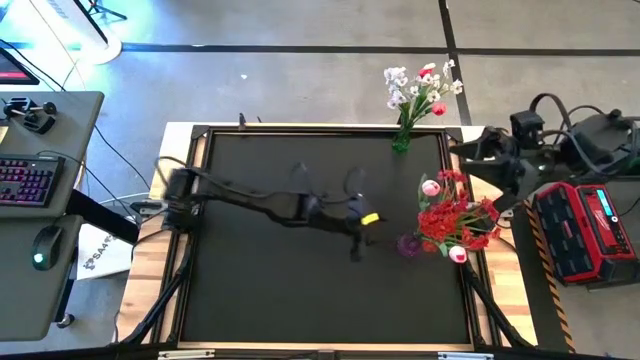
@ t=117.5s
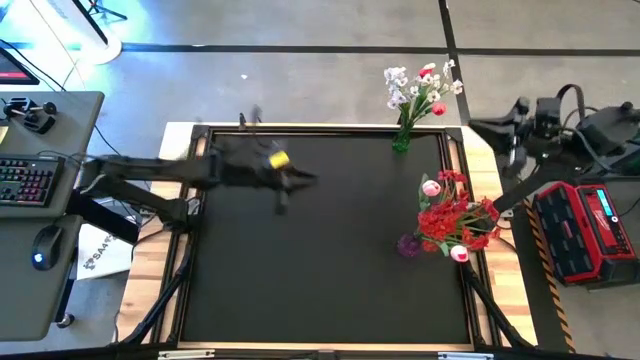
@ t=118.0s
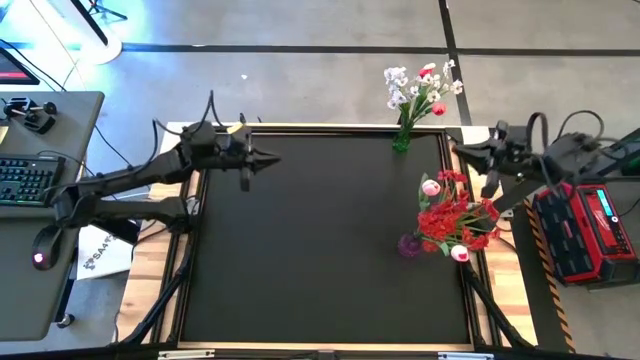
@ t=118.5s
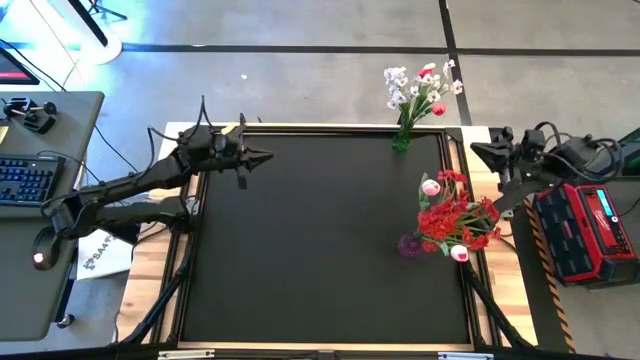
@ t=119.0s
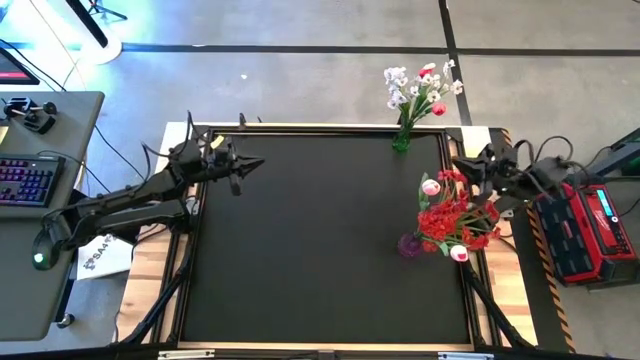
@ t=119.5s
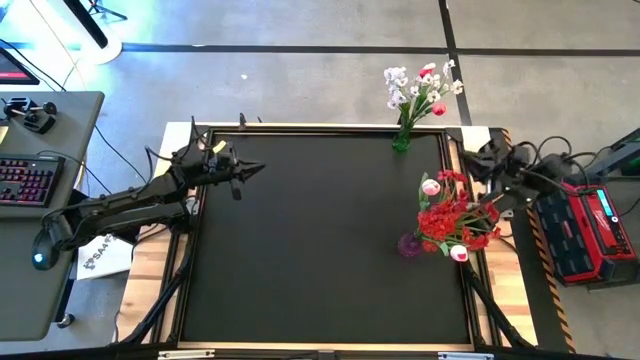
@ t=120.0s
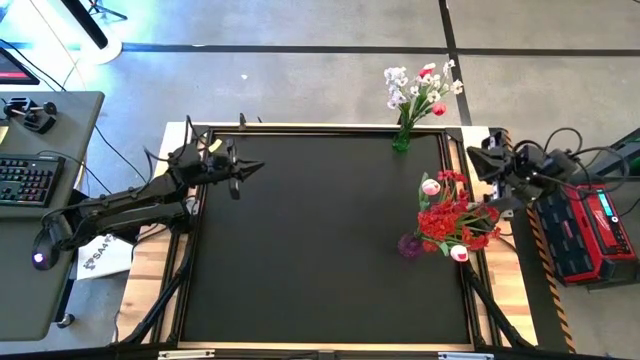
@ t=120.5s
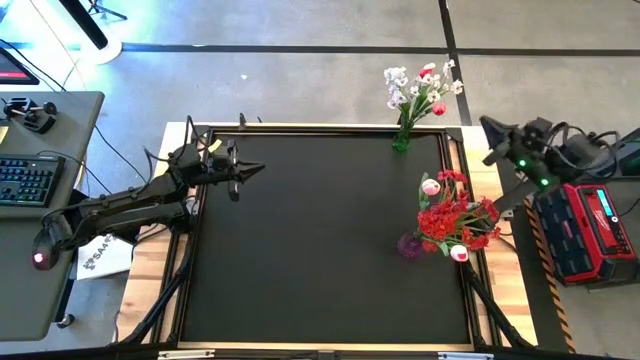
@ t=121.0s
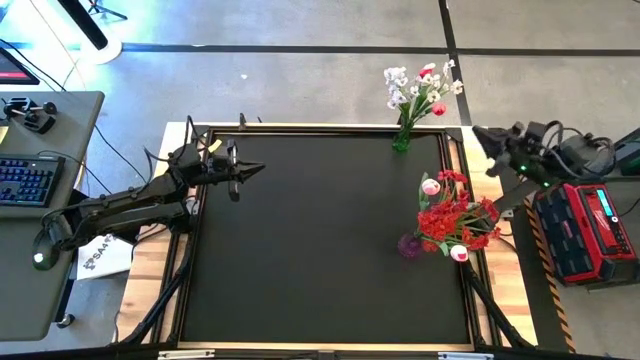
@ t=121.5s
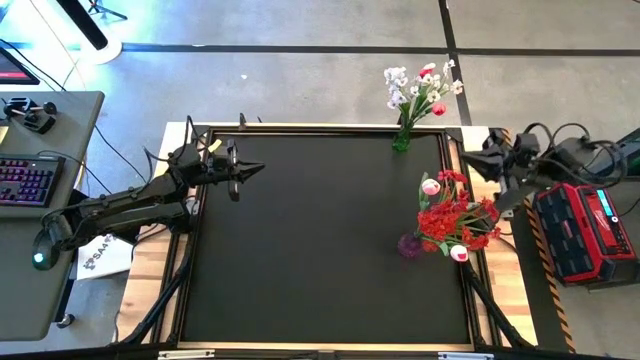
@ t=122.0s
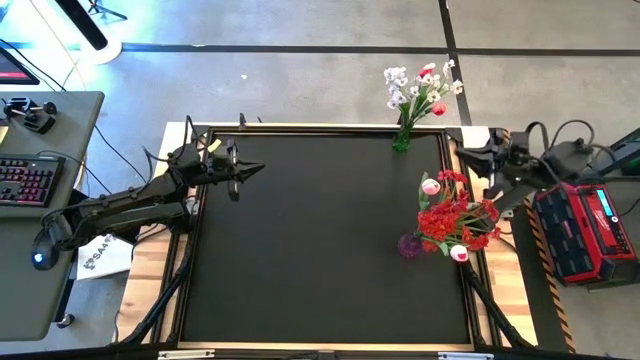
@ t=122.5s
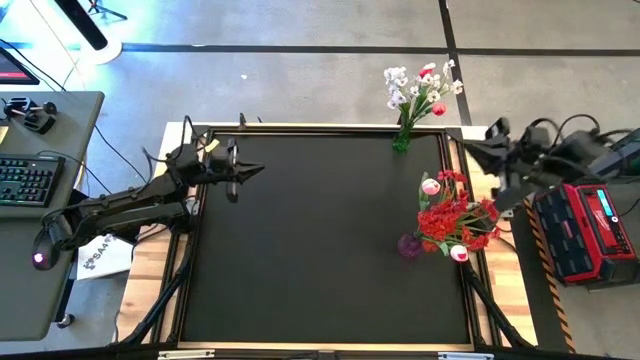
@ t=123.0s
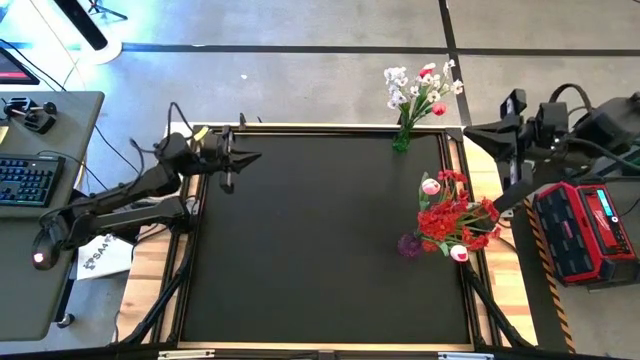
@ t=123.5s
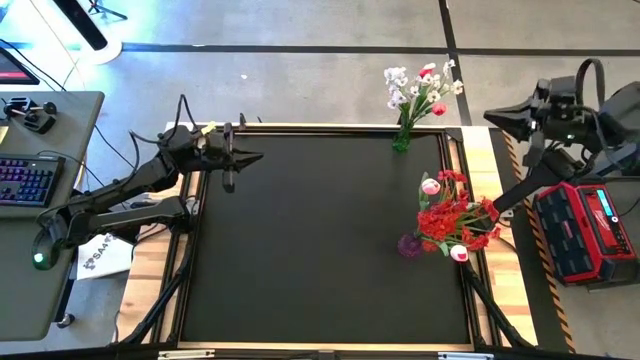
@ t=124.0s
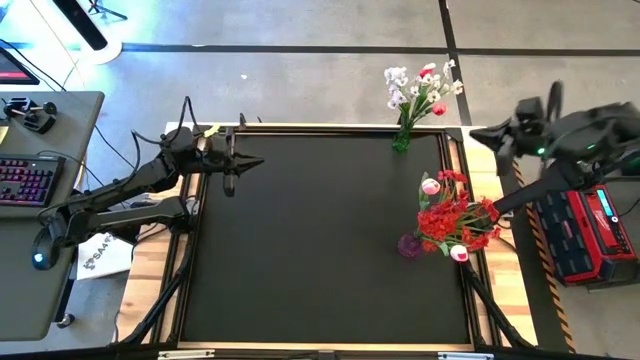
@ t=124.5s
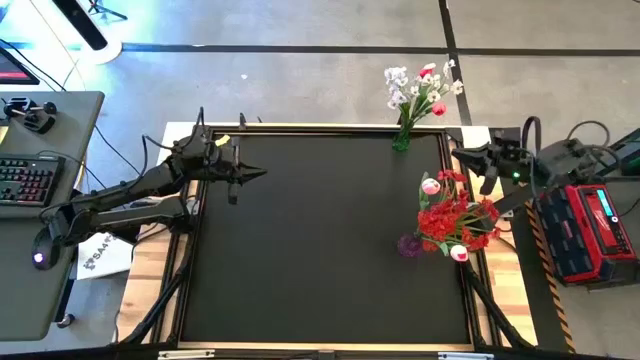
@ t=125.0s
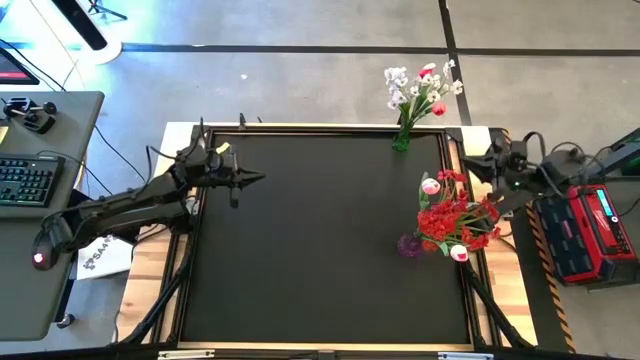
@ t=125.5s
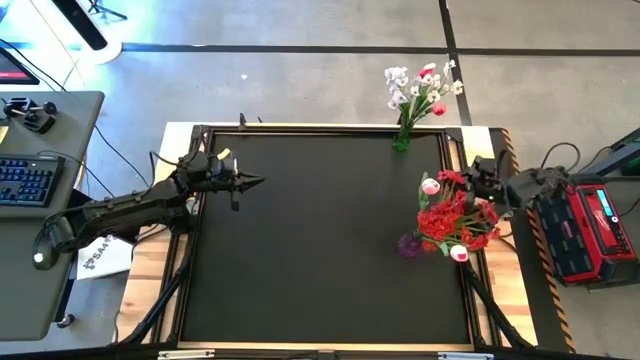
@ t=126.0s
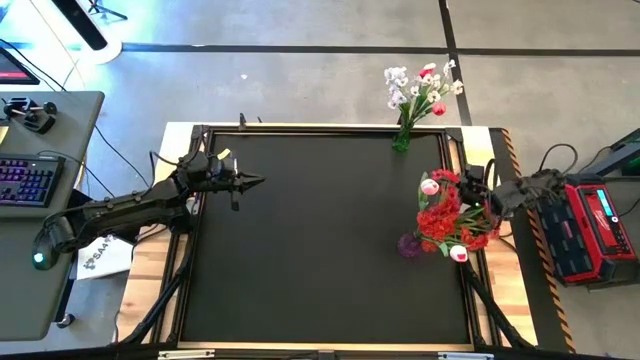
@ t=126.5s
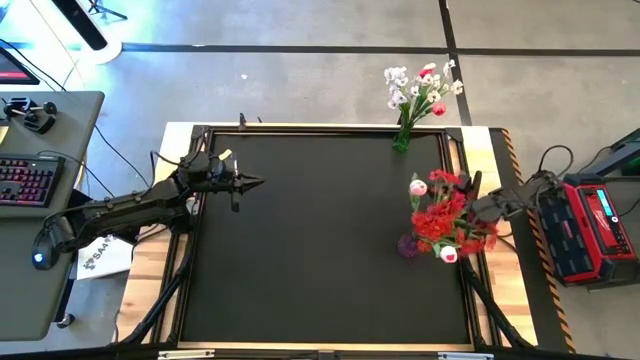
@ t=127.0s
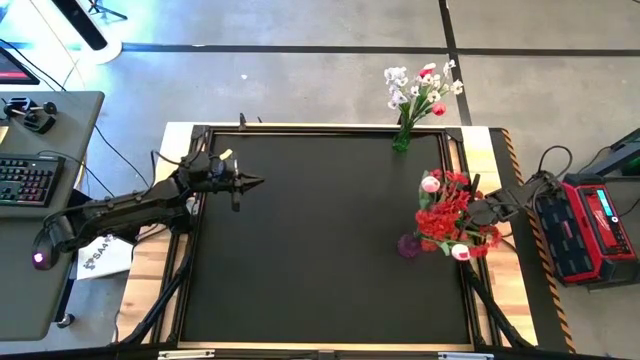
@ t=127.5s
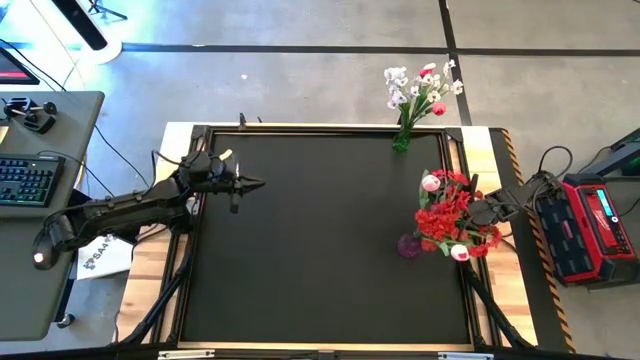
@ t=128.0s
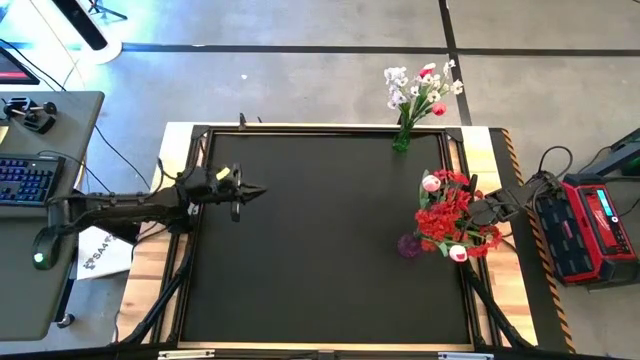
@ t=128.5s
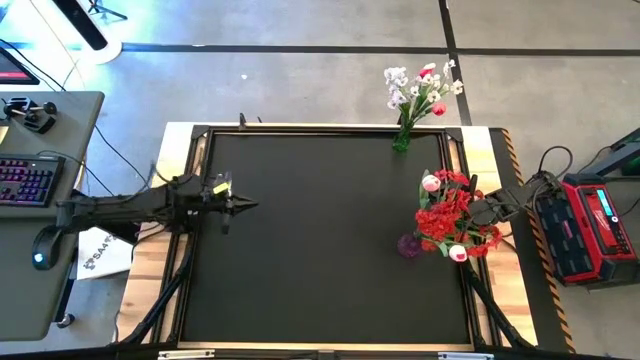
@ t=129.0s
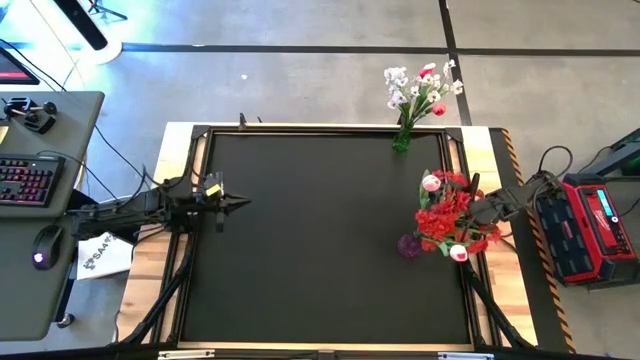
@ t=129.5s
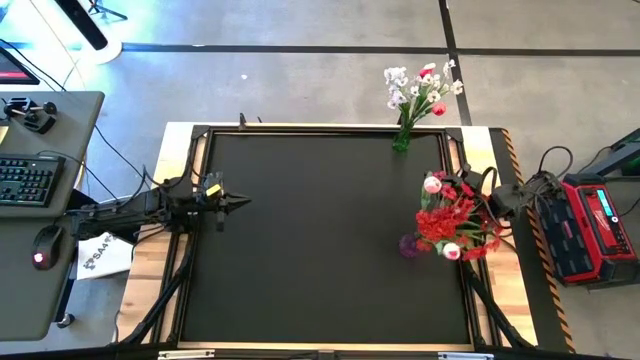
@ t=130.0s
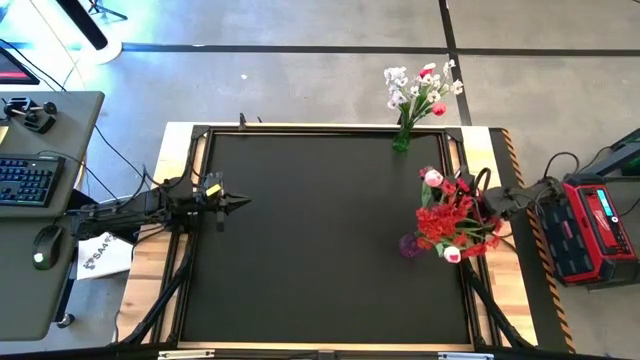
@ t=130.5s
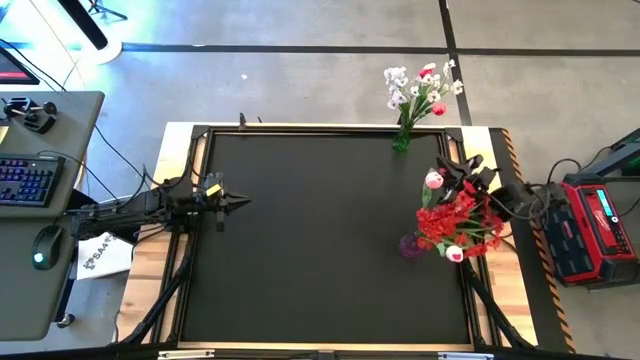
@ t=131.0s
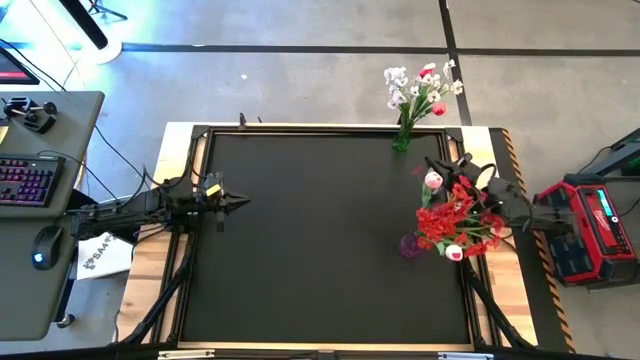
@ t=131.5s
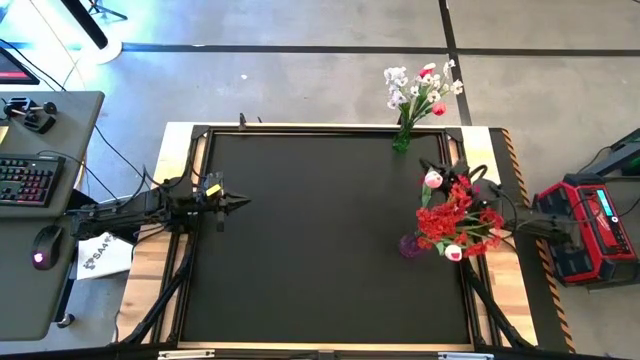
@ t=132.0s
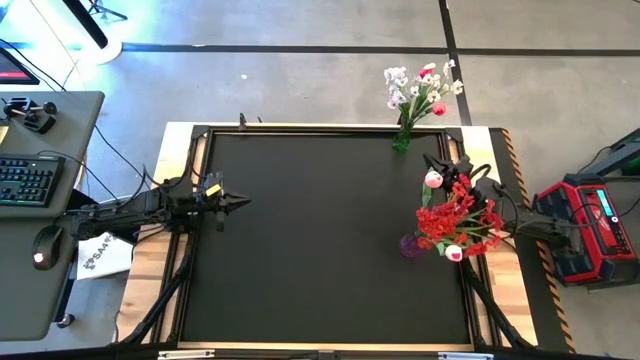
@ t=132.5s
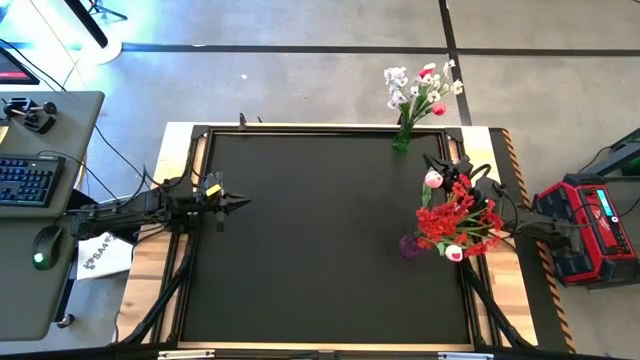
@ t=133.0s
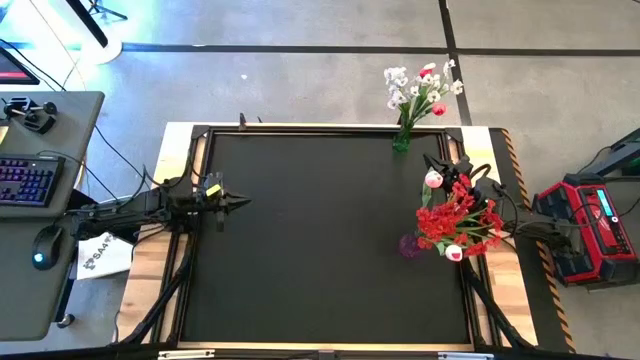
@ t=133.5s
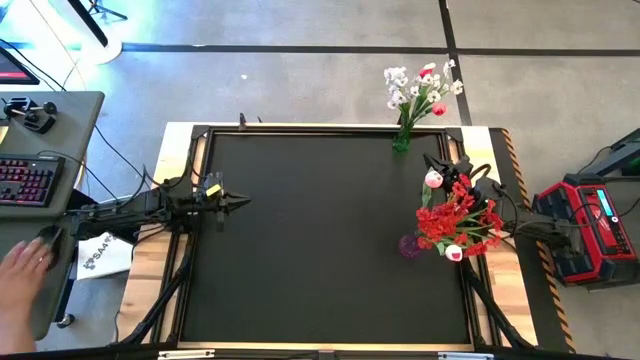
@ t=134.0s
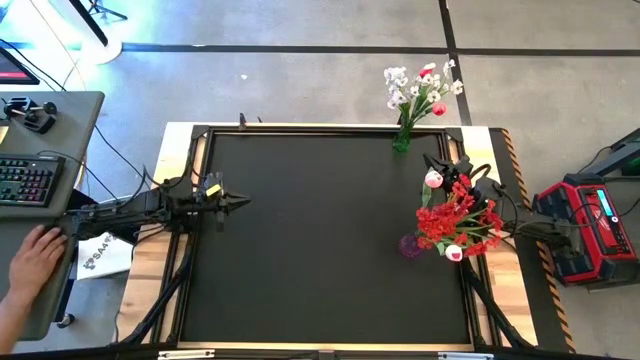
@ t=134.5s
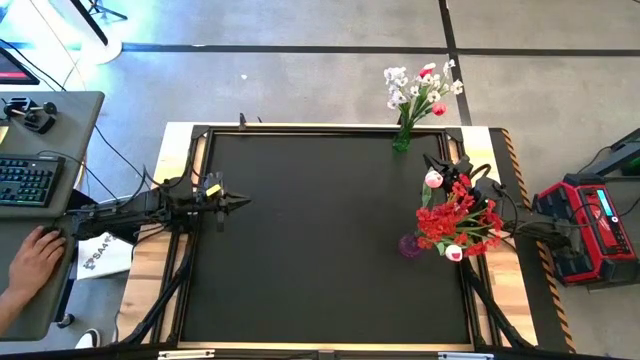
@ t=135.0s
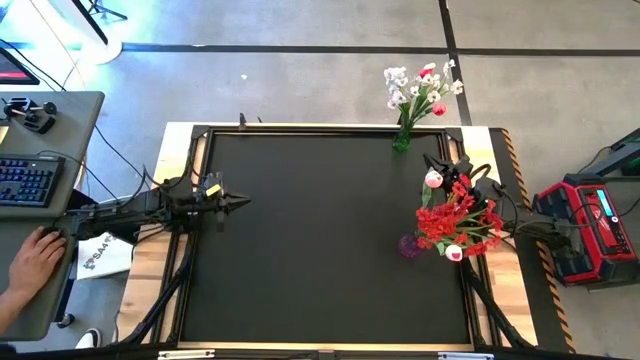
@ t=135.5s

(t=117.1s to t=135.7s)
Task: Sort flowers into vase by color
Return to Home Position

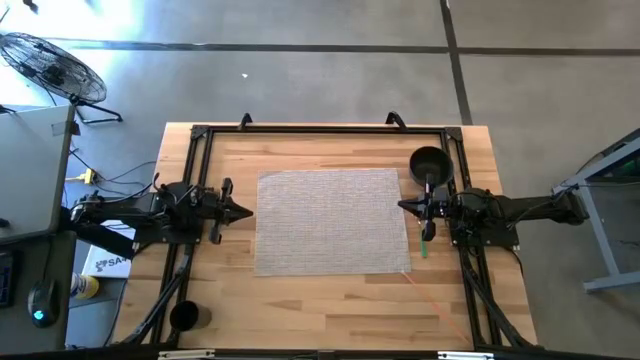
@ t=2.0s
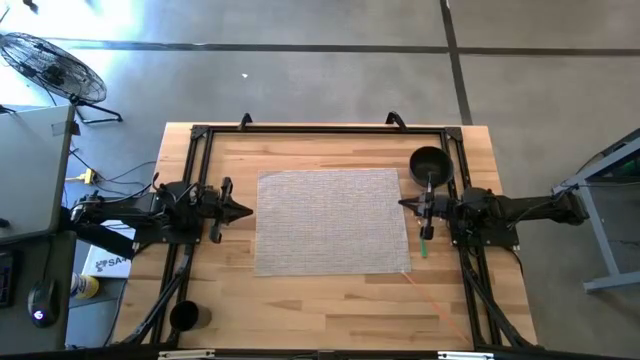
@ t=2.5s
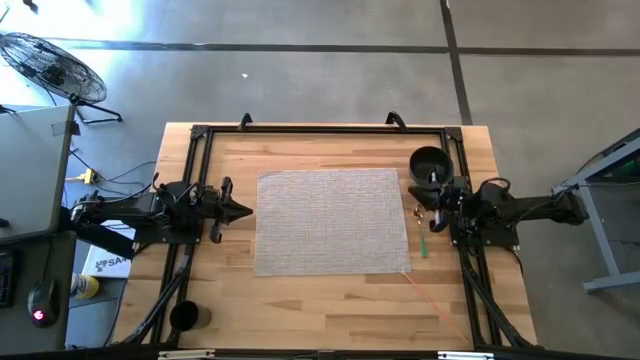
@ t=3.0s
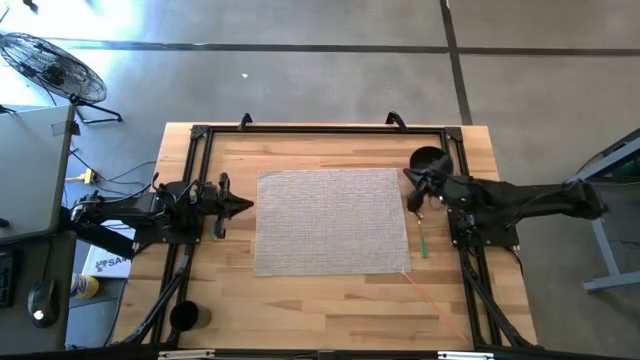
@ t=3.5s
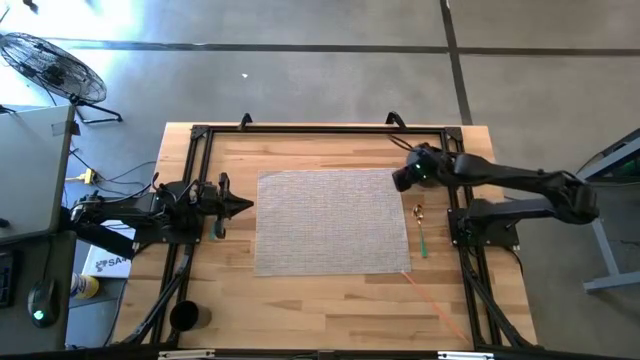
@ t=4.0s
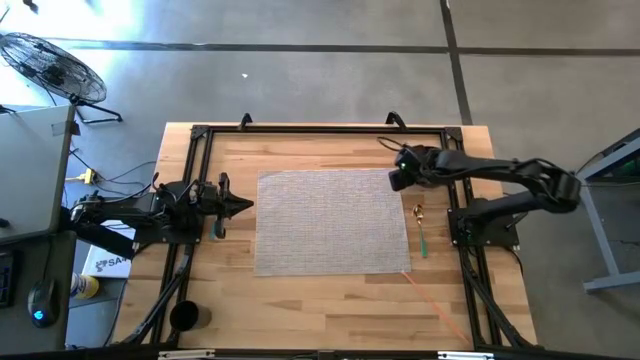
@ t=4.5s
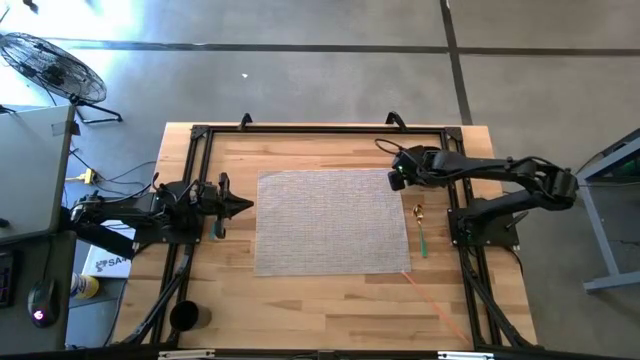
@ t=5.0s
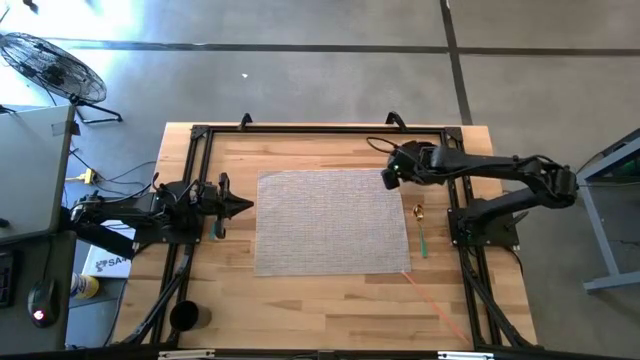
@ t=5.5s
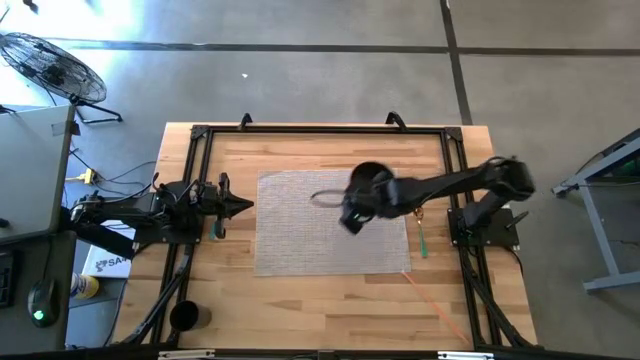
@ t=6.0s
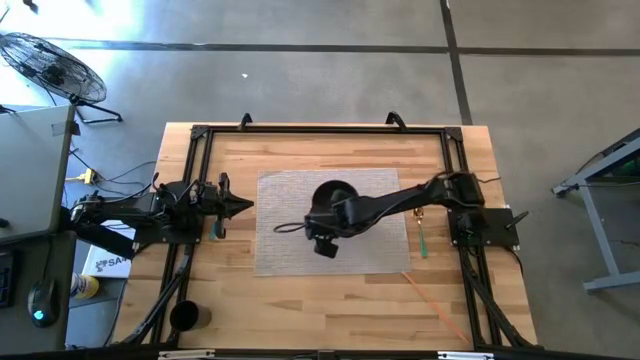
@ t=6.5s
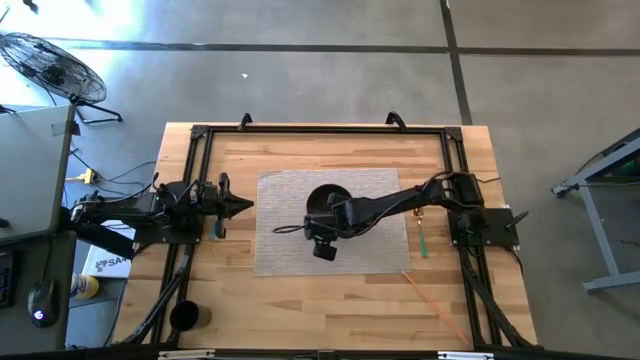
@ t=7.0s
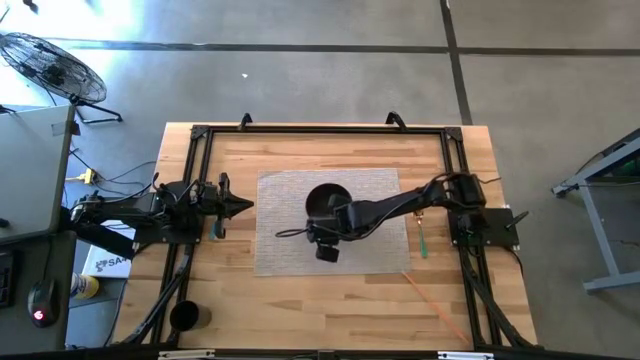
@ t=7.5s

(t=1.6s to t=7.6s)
Task: Pick & Place Utensil
Put the black bowl on the table mat
